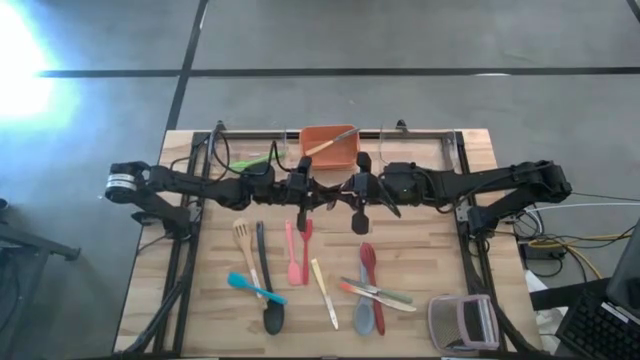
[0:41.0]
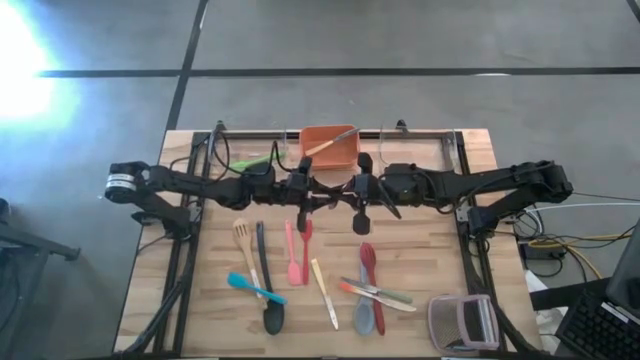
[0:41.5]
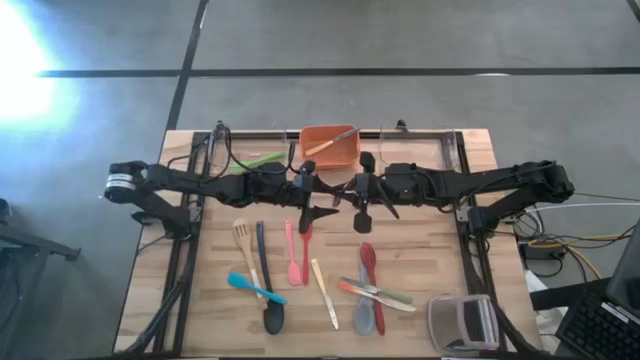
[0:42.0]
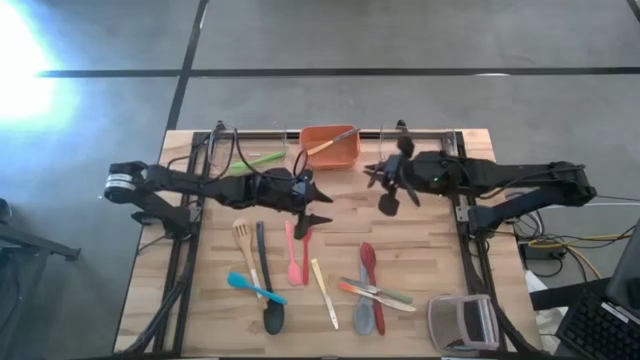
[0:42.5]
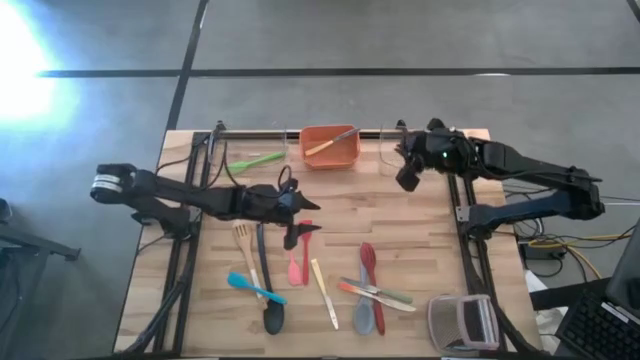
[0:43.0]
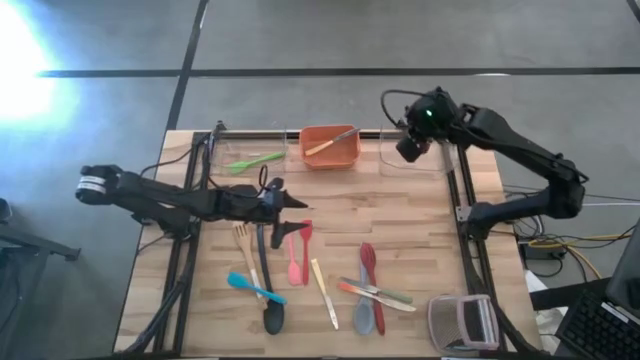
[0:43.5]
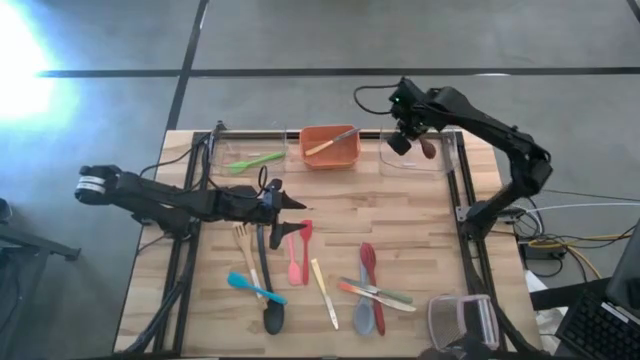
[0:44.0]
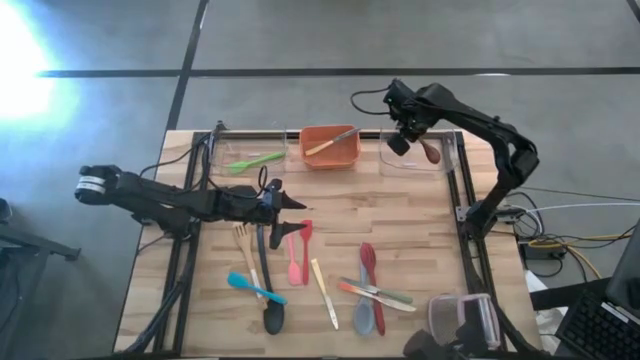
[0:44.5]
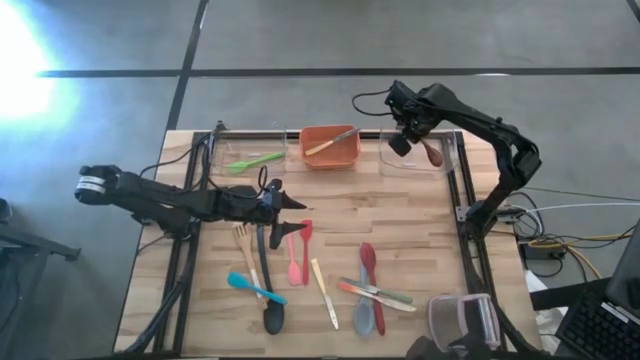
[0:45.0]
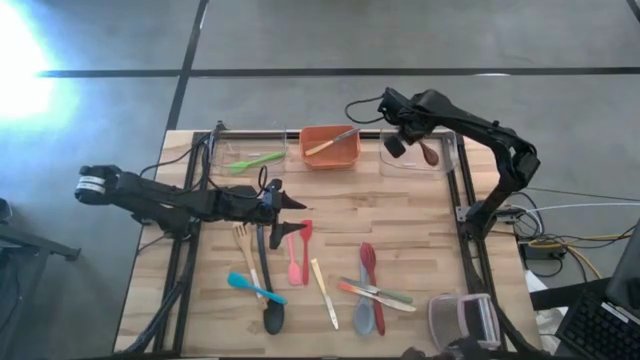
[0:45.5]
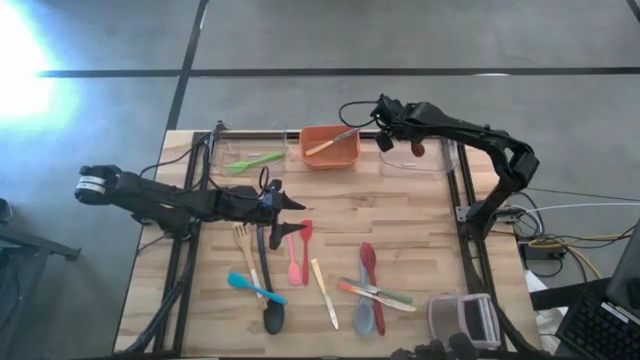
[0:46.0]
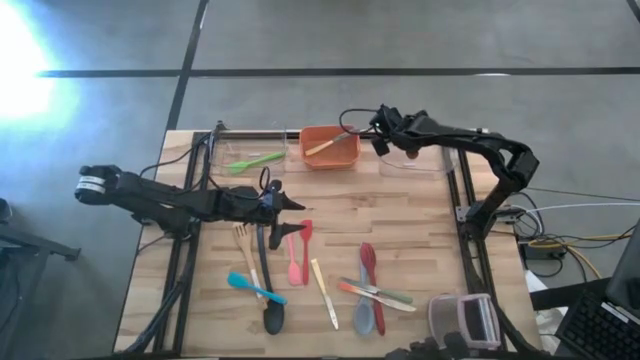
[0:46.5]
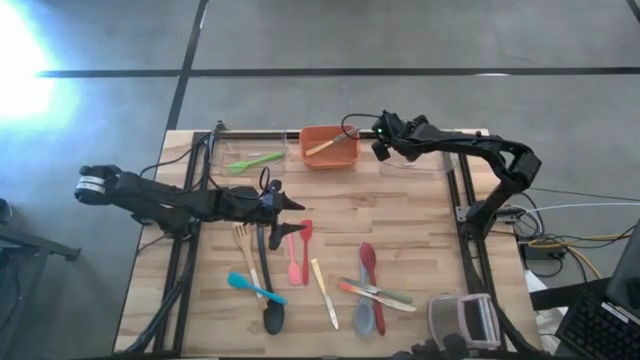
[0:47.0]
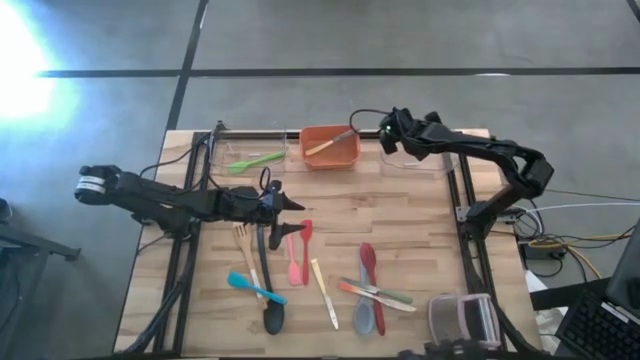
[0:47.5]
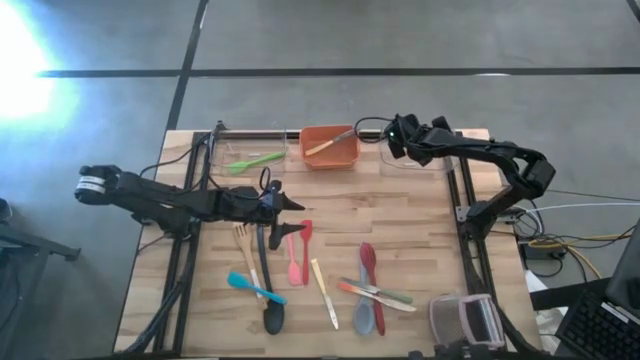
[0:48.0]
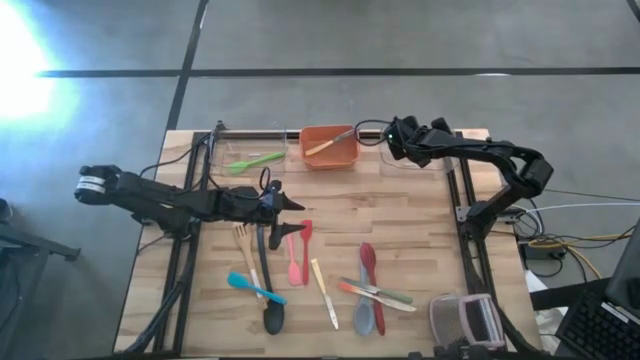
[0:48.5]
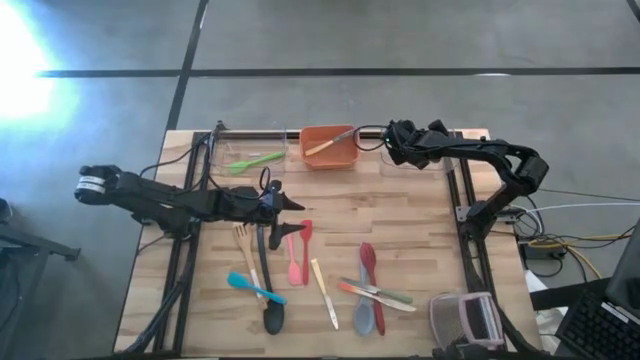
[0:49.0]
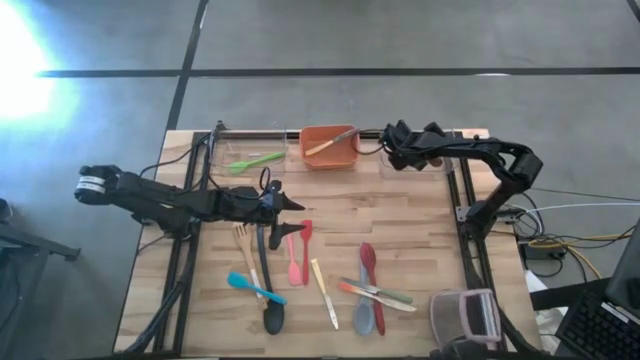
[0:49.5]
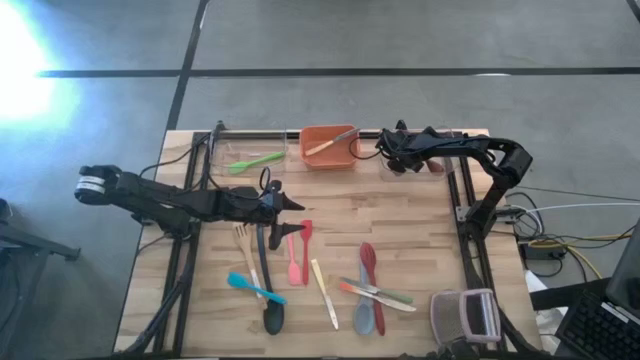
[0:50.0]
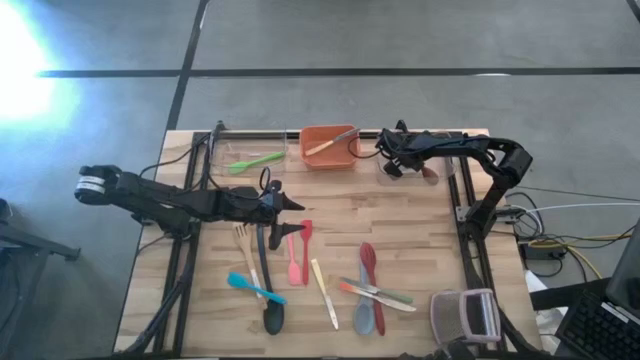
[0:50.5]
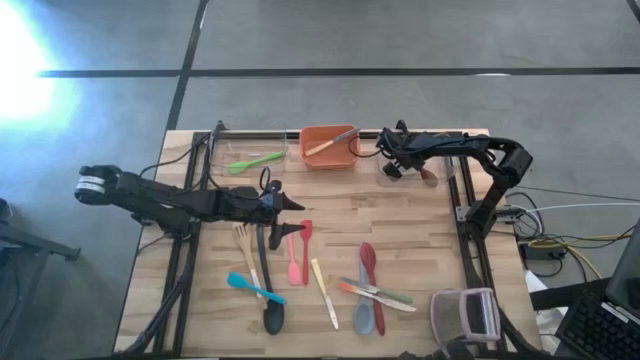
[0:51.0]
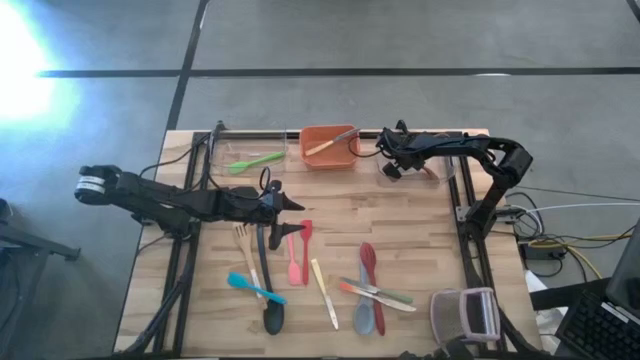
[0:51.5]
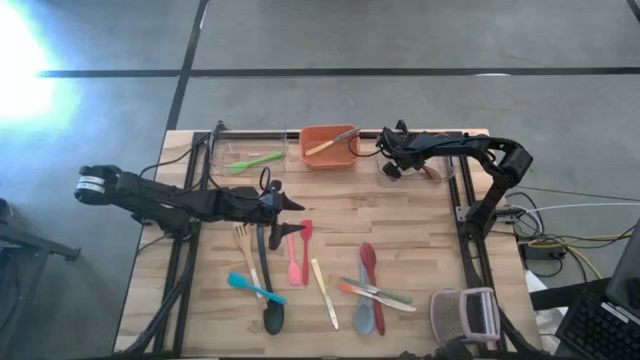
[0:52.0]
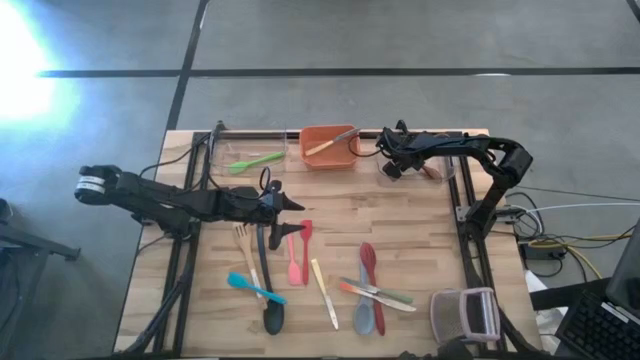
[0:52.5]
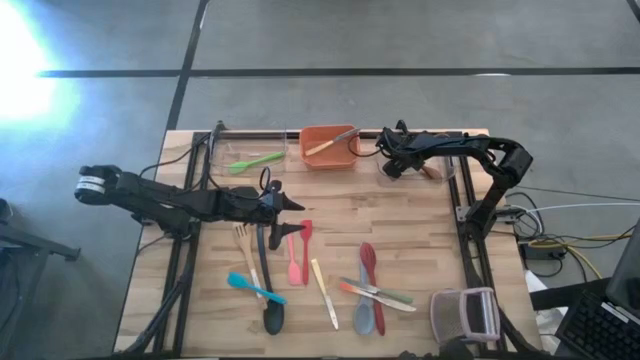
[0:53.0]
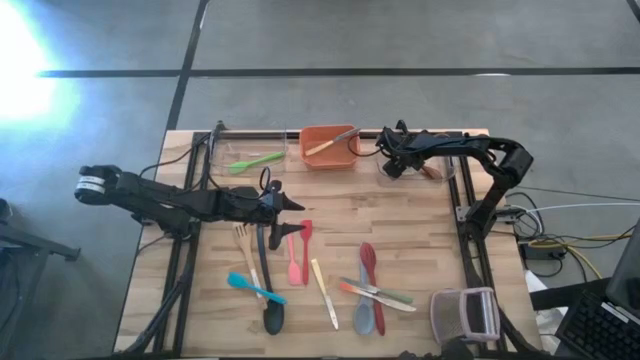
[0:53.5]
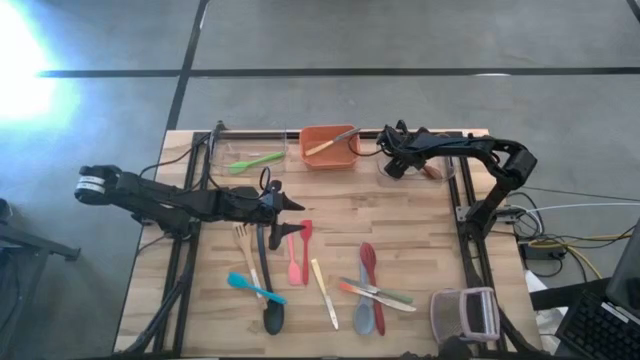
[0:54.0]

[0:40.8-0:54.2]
Task: Pick & Place Kitchen Items
Put the wooden serving spoon into the right transparent bin

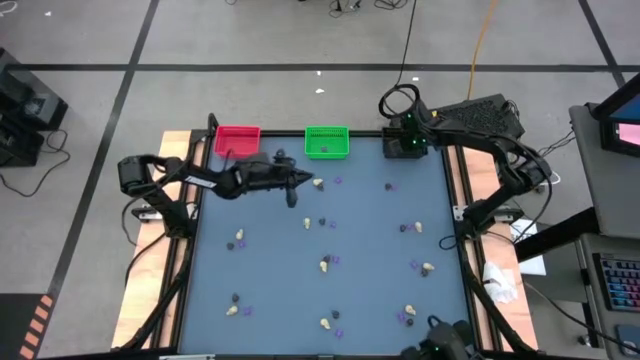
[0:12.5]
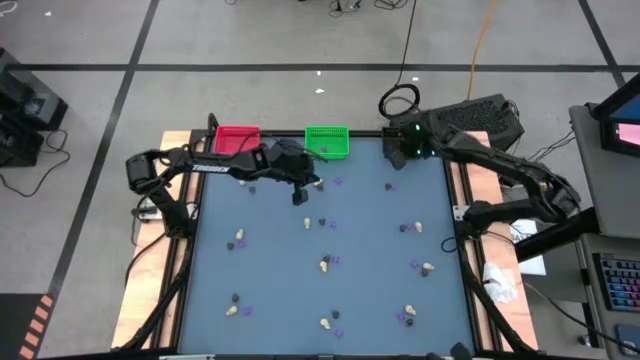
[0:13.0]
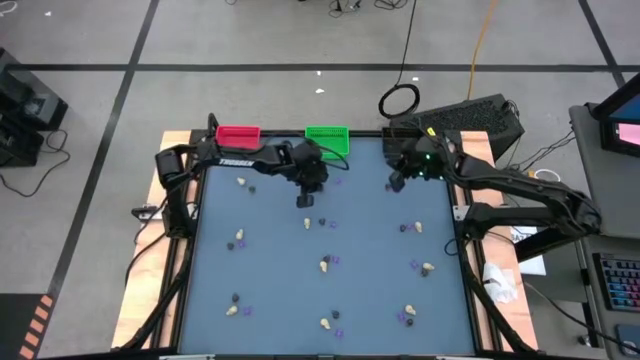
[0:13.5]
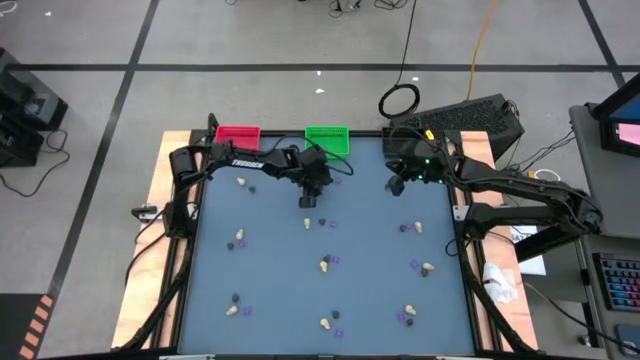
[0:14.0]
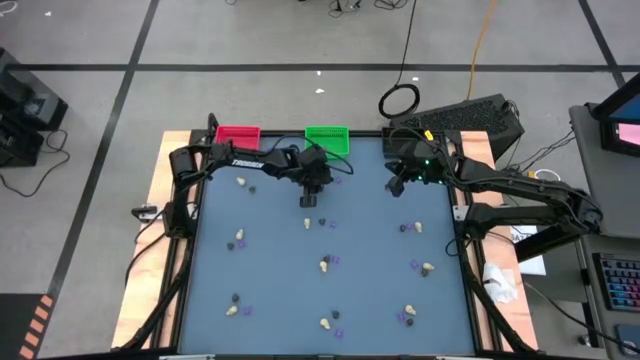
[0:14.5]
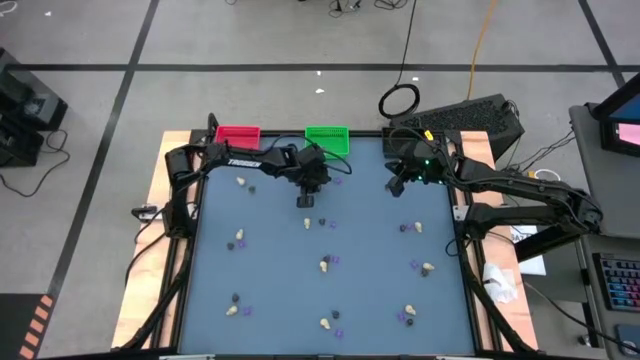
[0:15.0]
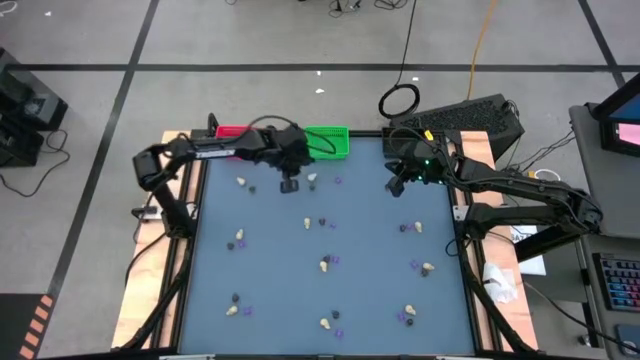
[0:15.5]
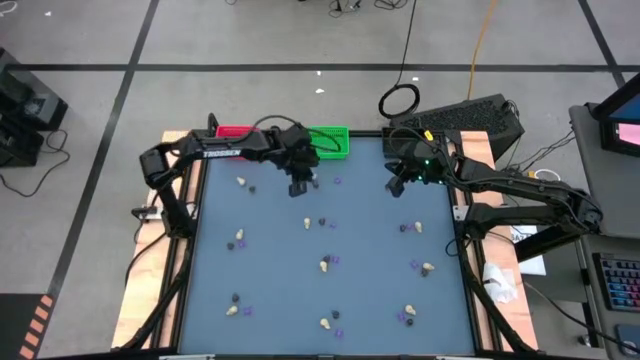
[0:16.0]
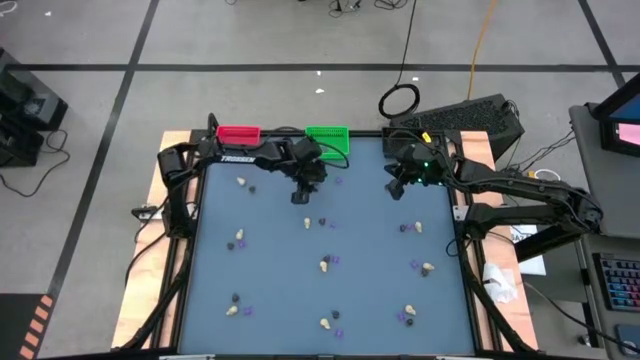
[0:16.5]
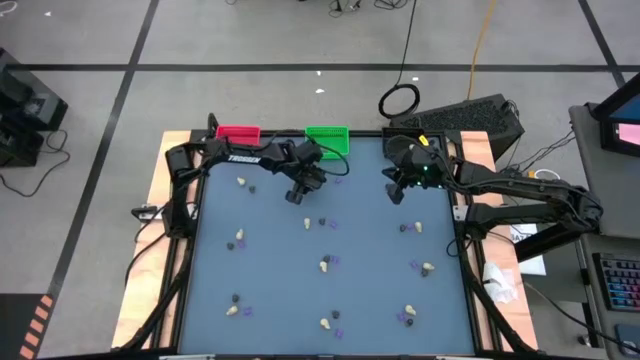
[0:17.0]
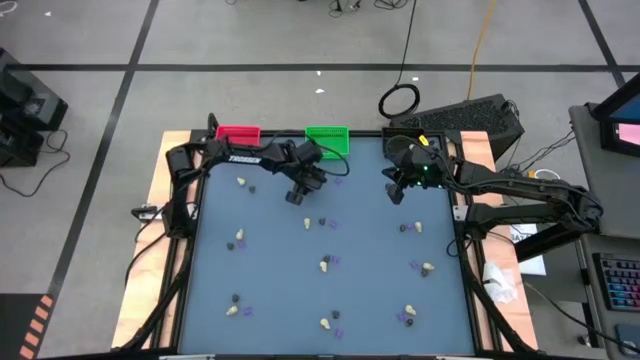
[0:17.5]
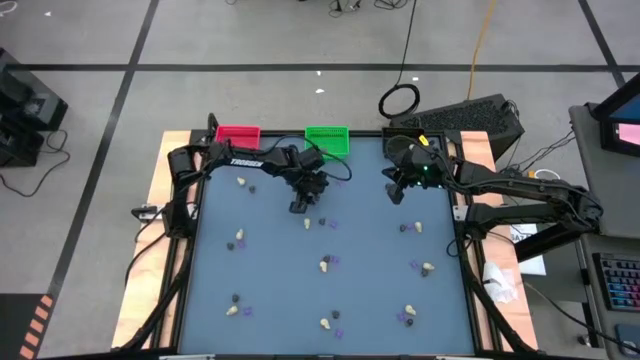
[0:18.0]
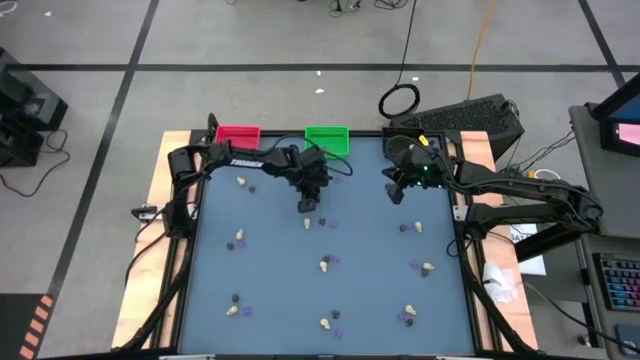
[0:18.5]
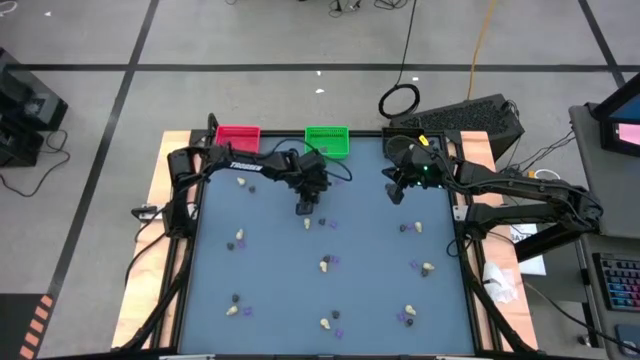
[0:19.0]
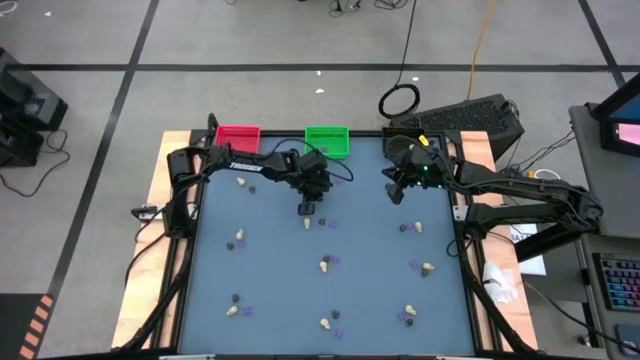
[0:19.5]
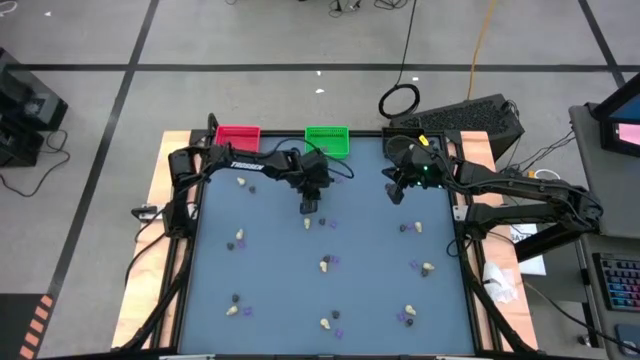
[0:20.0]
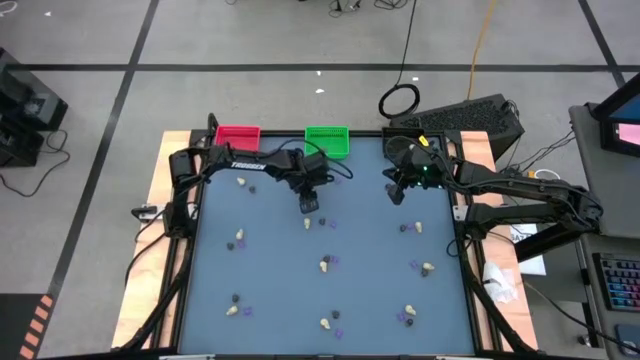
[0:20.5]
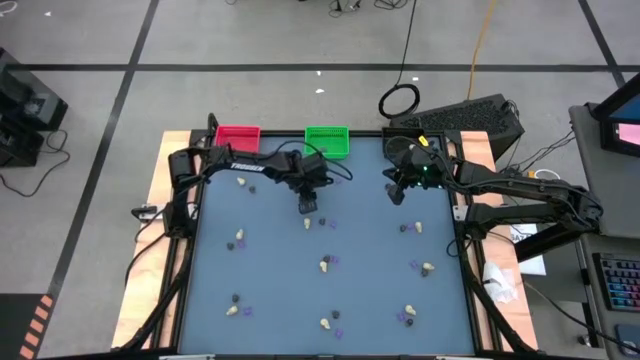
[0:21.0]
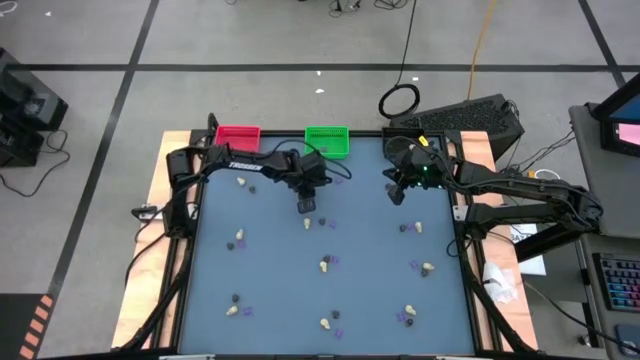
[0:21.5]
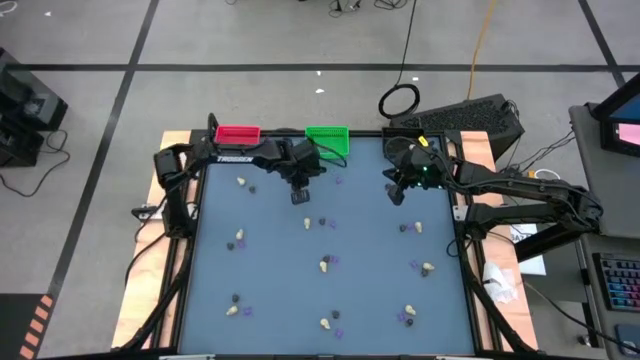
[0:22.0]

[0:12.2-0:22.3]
Task: Sort Halloween decoration
Put the black skull toy into the red bin
